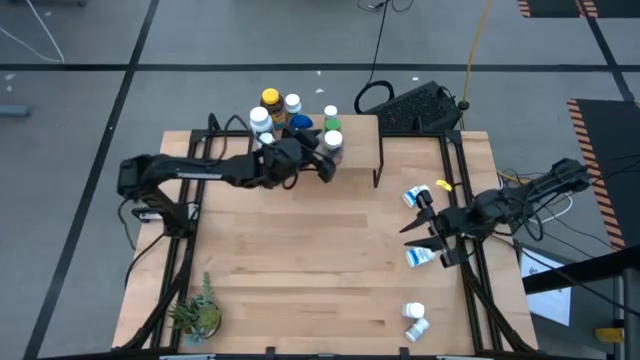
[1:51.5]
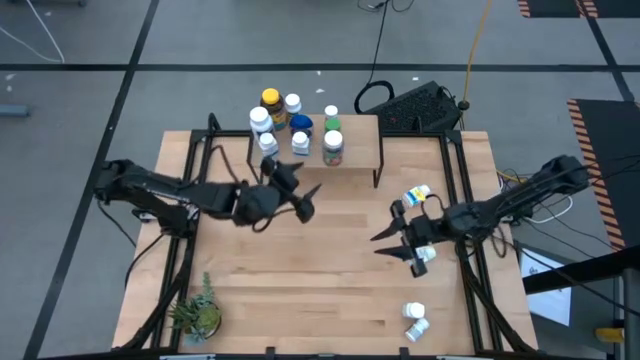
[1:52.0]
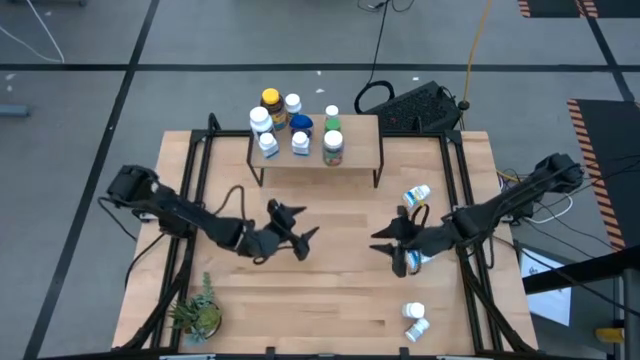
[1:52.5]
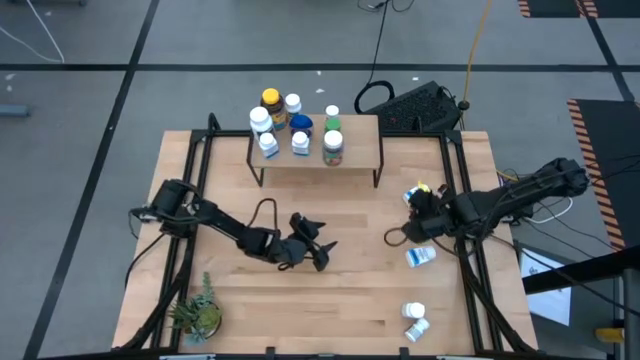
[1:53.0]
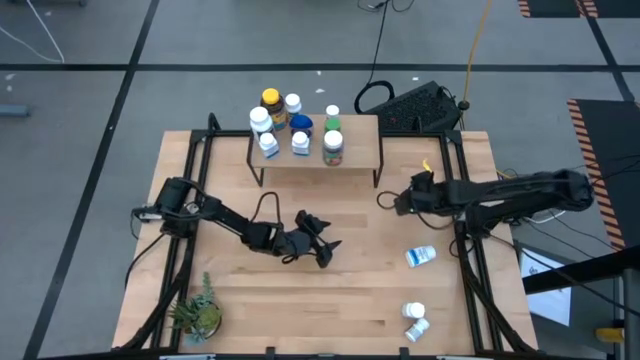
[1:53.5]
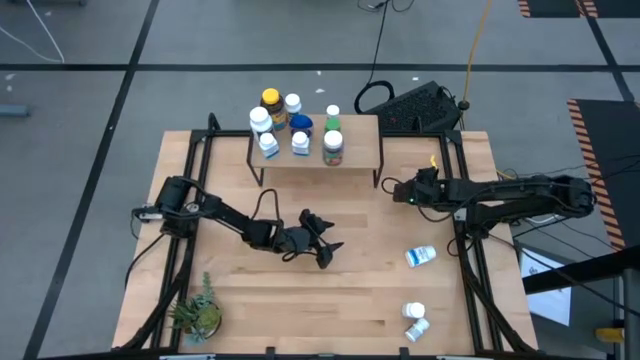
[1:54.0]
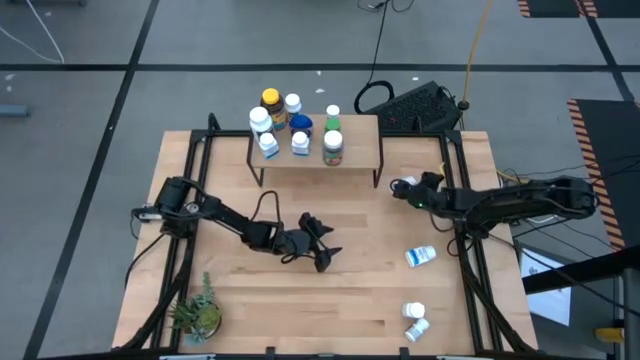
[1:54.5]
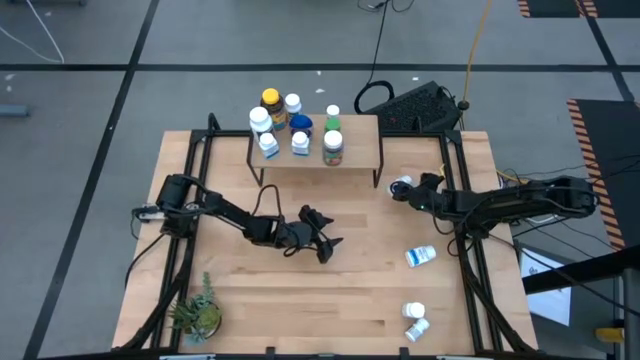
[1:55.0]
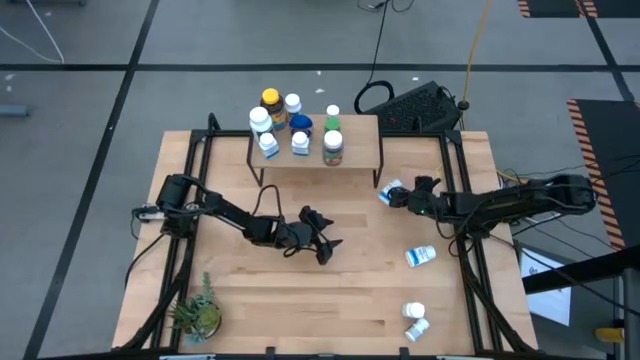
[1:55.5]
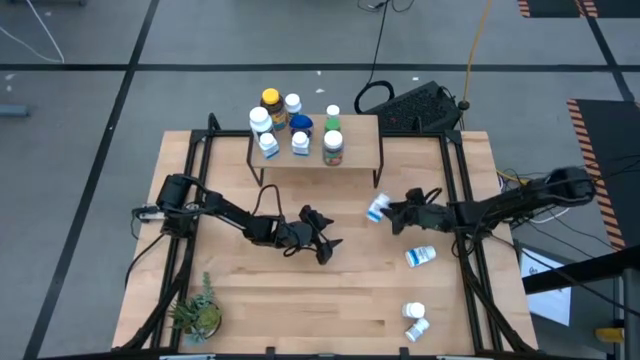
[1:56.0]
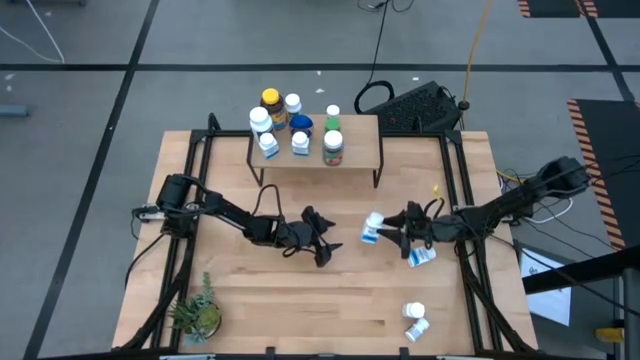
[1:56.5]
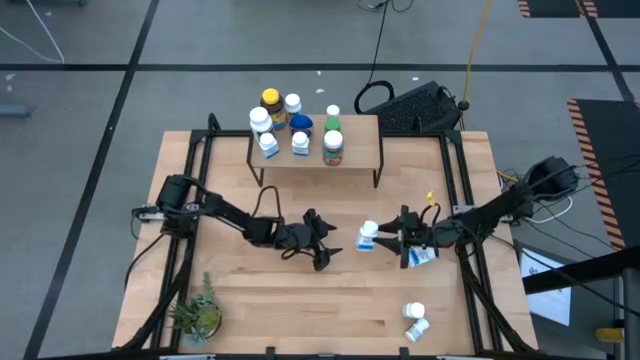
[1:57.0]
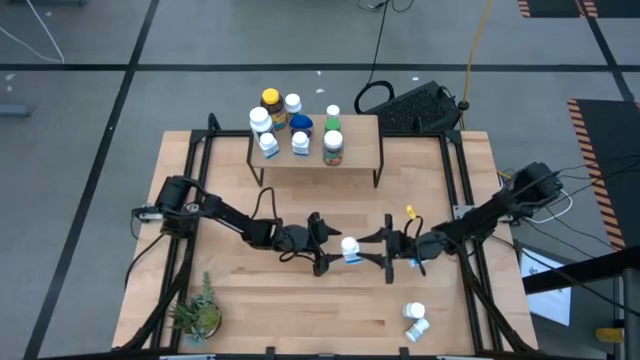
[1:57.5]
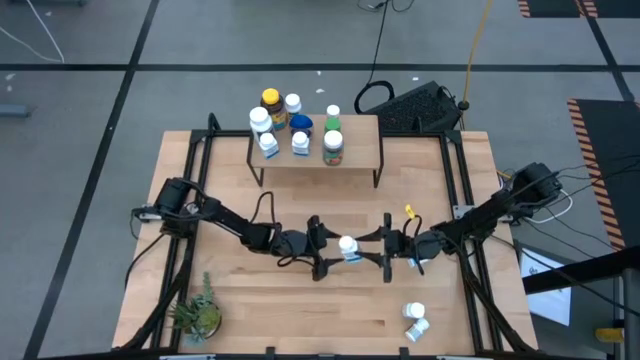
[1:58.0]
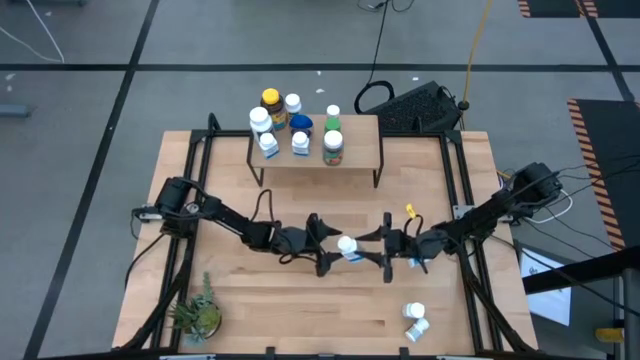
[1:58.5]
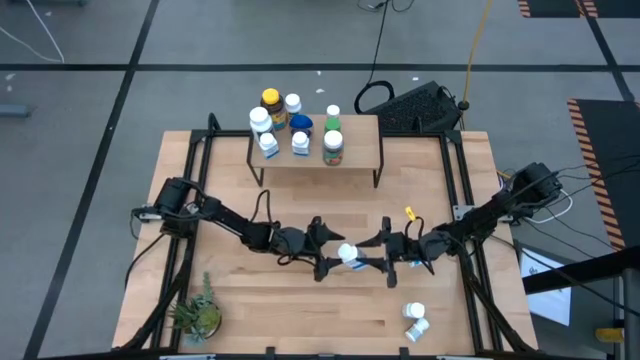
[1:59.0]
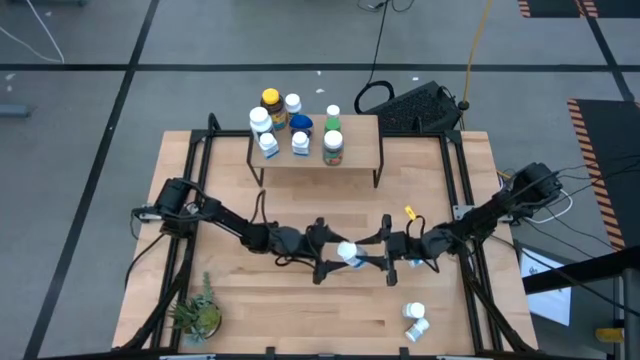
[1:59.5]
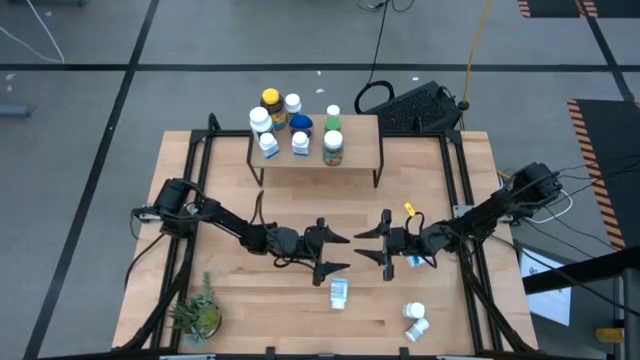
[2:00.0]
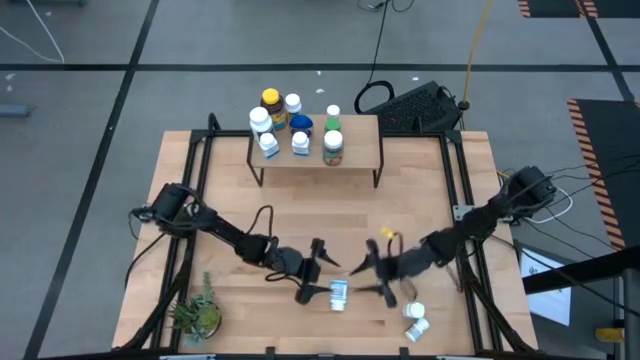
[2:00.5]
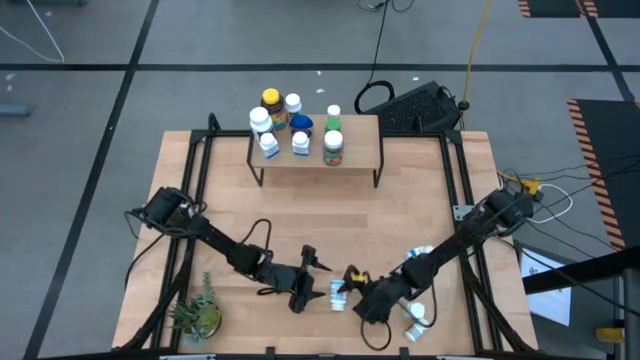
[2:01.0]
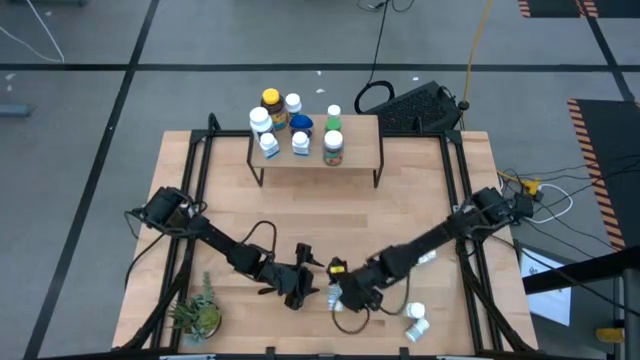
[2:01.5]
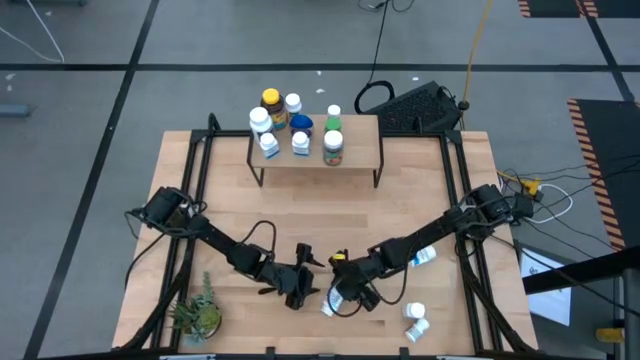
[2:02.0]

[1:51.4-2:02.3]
Task: Pick and place medicine bottles onto shelf by color
Put the white blue medicine bottle on the shelf

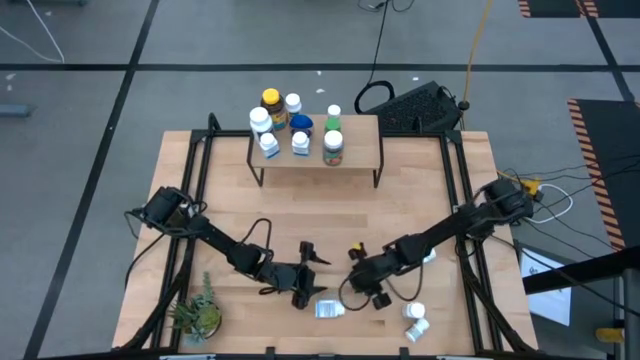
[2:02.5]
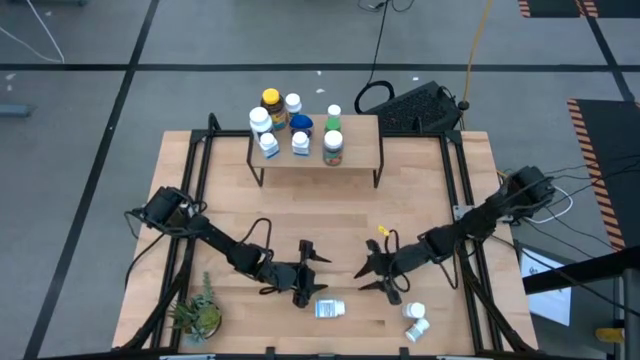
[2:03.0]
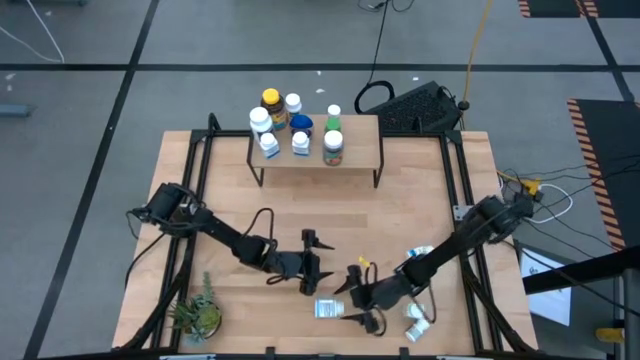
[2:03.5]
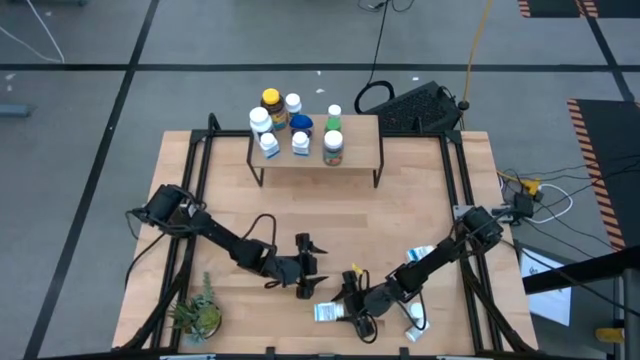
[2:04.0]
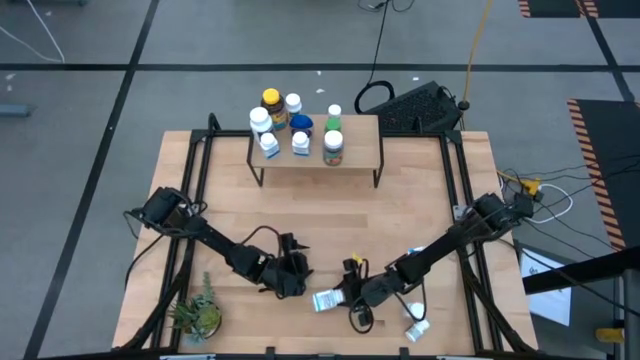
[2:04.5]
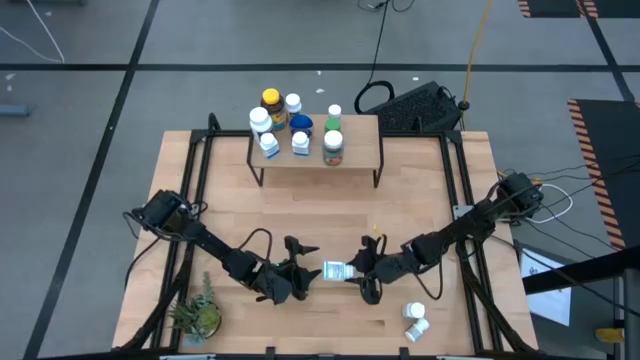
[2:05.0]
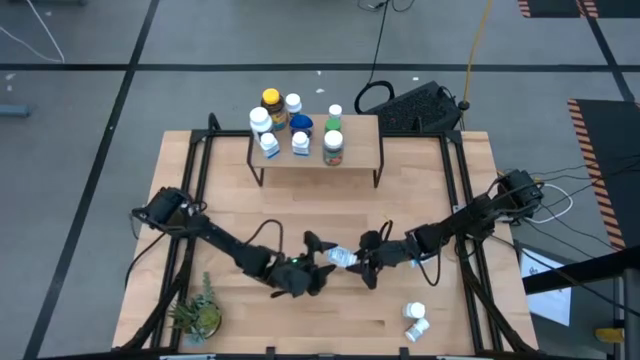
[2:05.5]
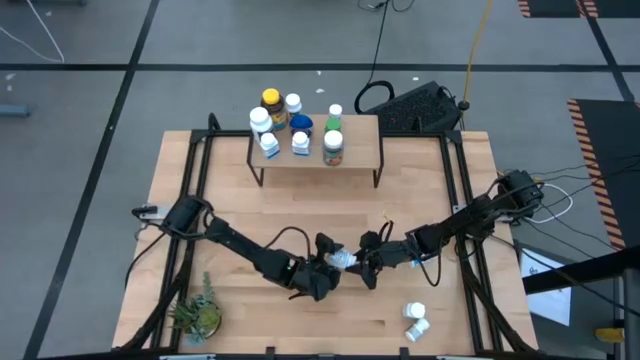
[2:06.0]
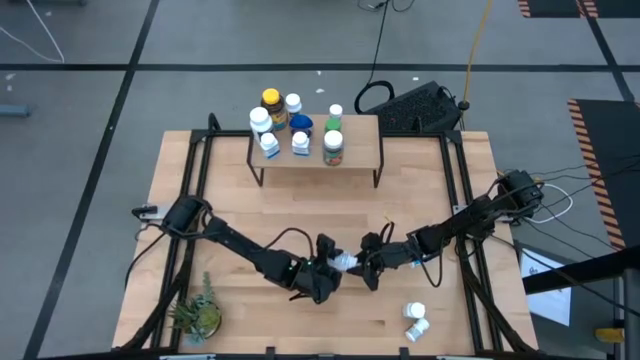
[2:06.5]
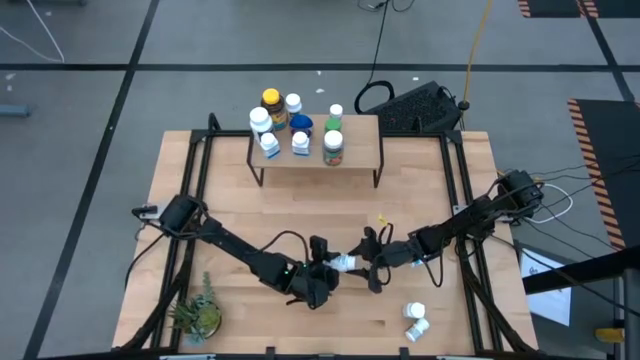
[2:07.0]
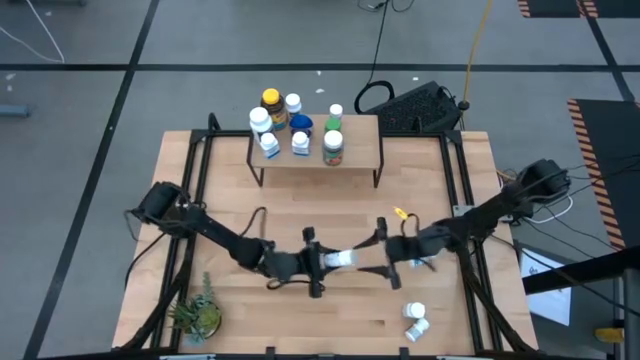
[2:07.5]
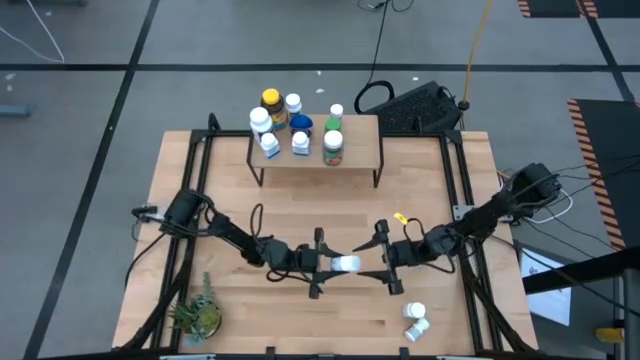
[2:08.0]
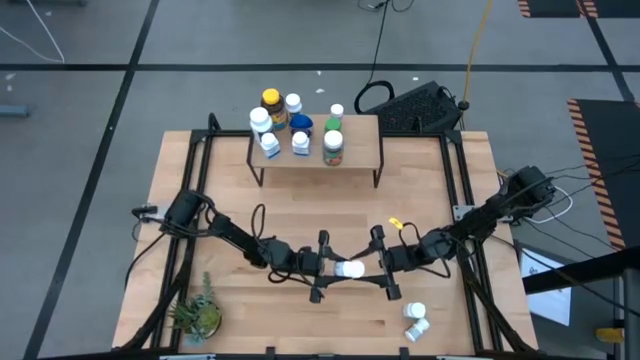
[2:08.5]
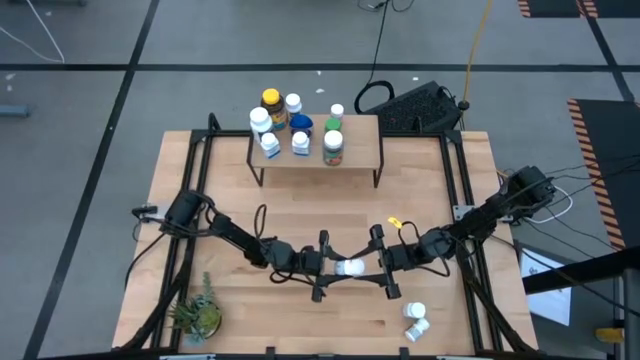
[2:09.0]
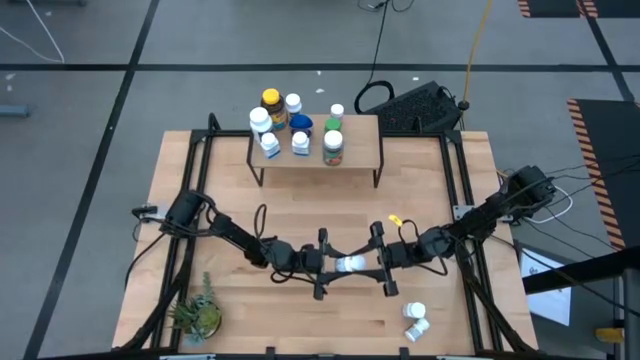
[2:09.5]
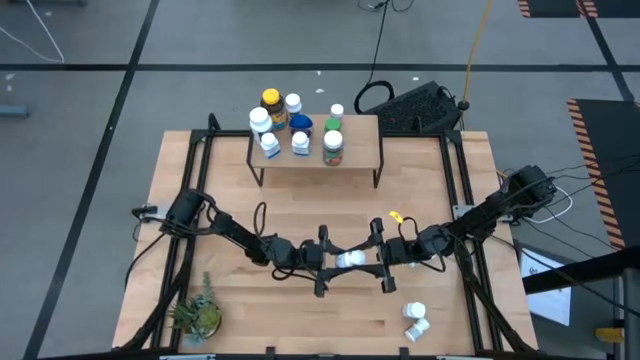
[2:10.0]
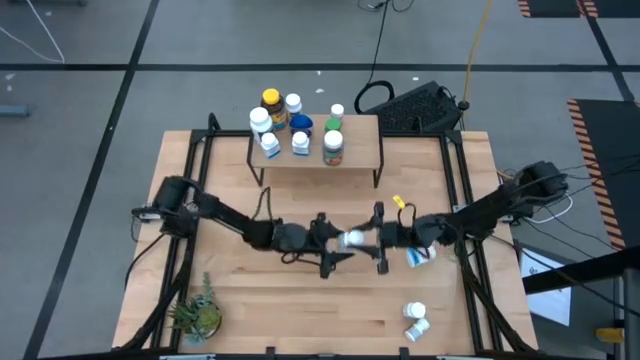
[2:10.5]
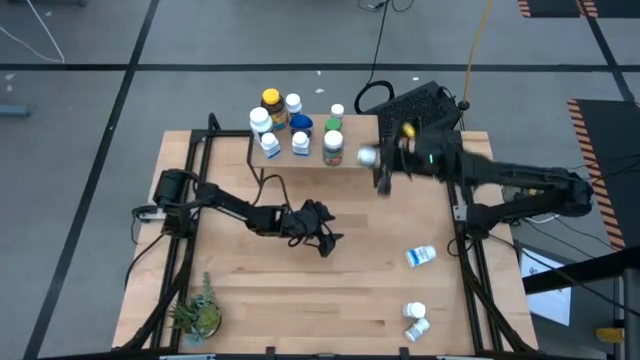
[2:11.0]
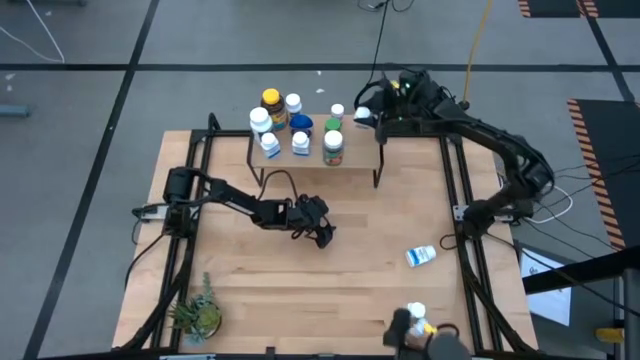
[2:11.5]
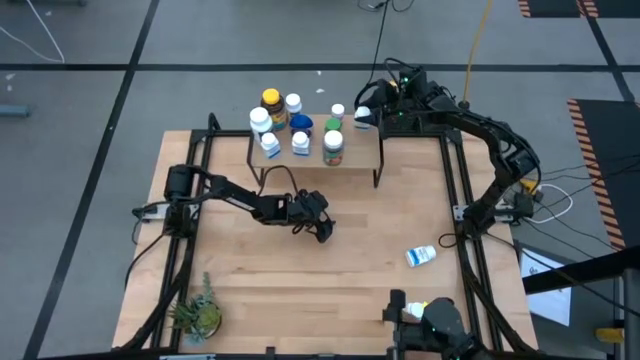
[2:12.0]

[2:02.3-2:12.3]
Put the white blue medicine bottle on the shelf
